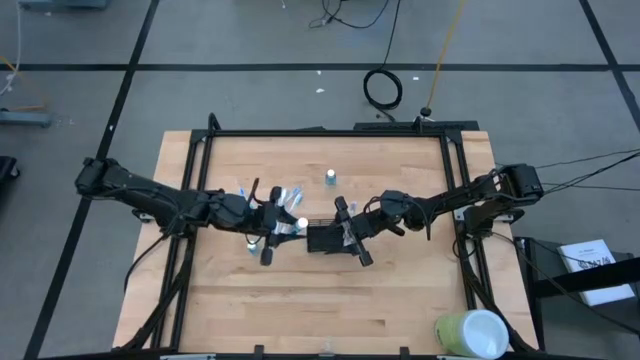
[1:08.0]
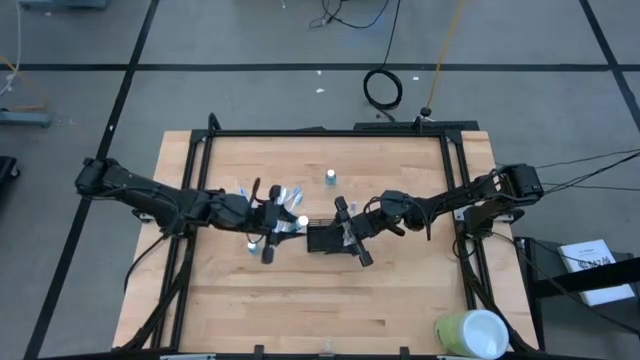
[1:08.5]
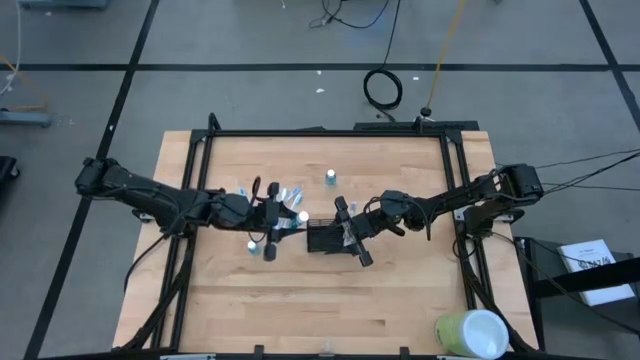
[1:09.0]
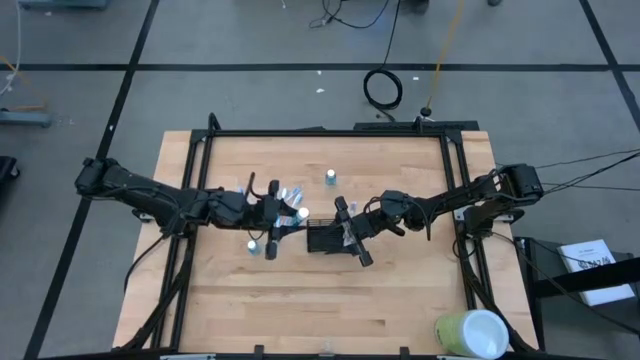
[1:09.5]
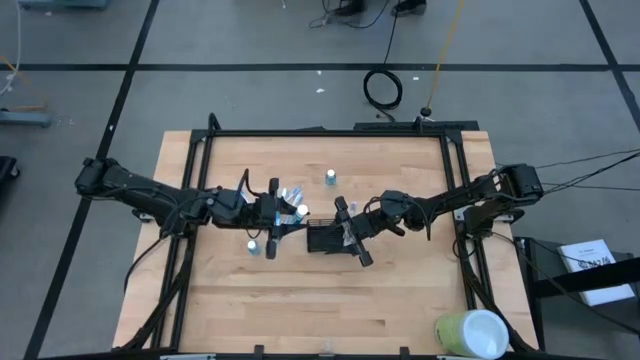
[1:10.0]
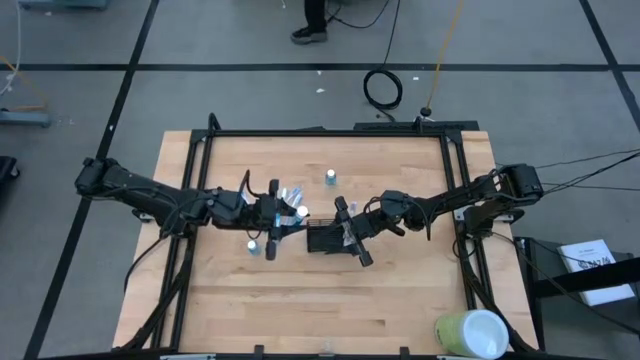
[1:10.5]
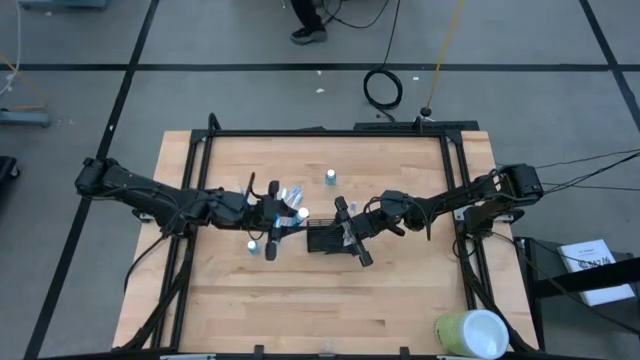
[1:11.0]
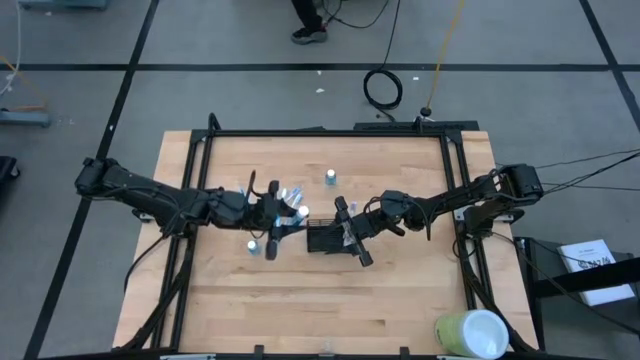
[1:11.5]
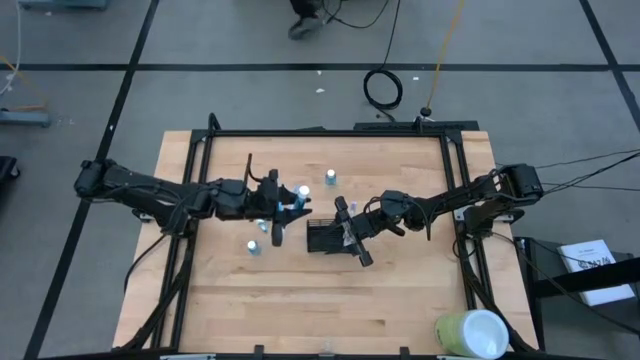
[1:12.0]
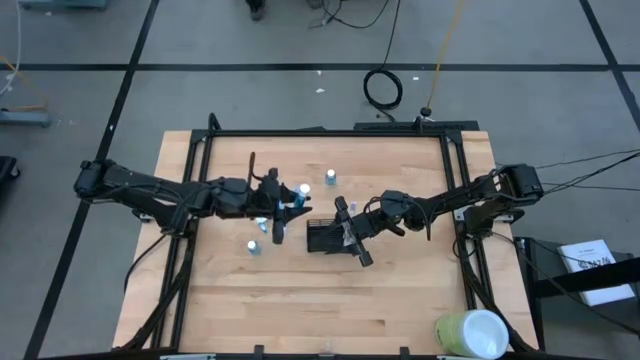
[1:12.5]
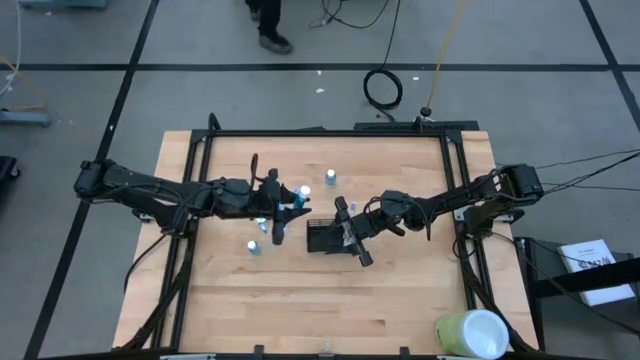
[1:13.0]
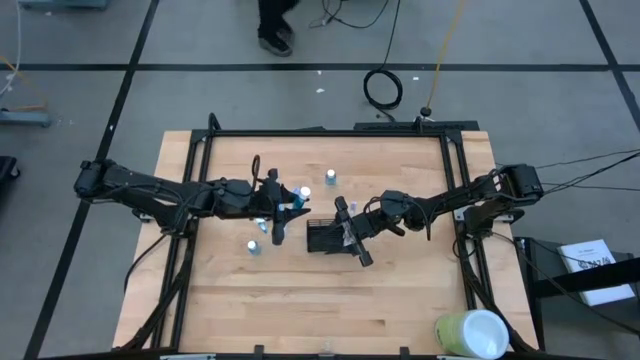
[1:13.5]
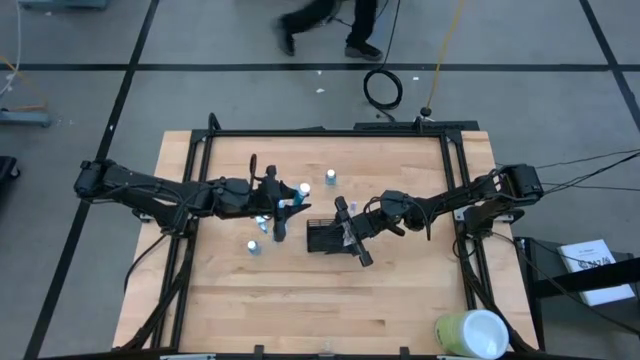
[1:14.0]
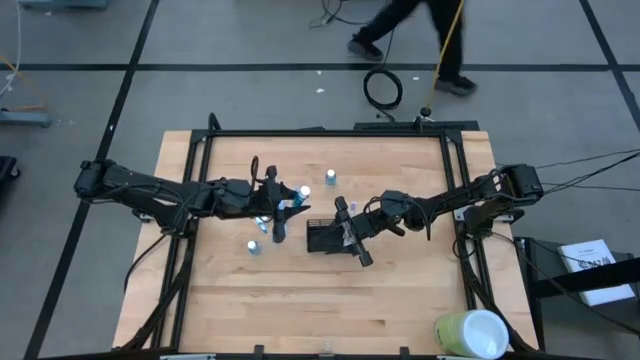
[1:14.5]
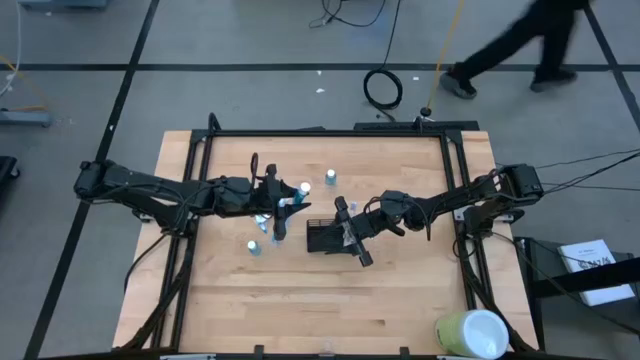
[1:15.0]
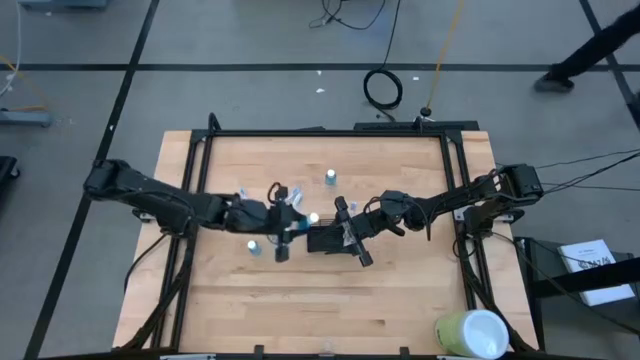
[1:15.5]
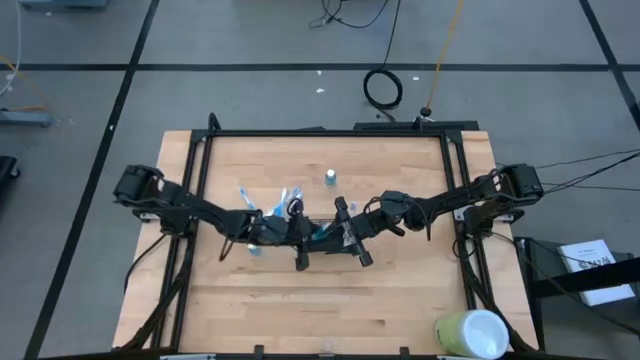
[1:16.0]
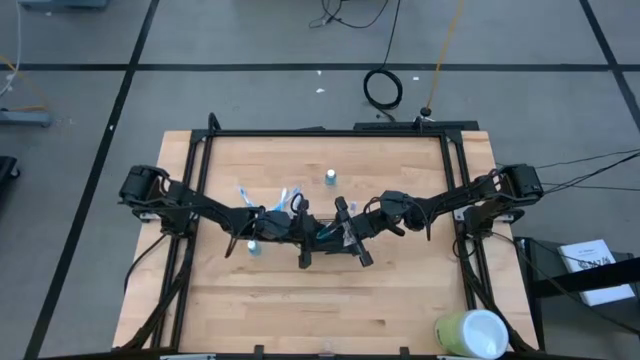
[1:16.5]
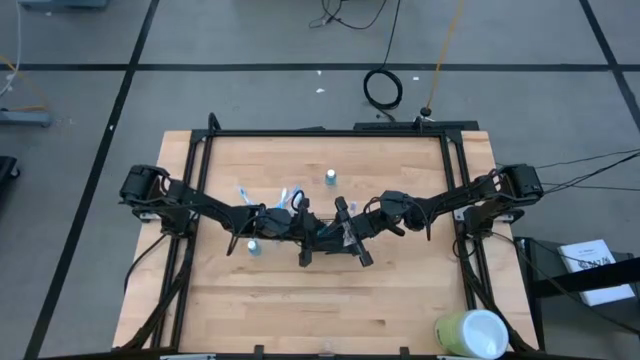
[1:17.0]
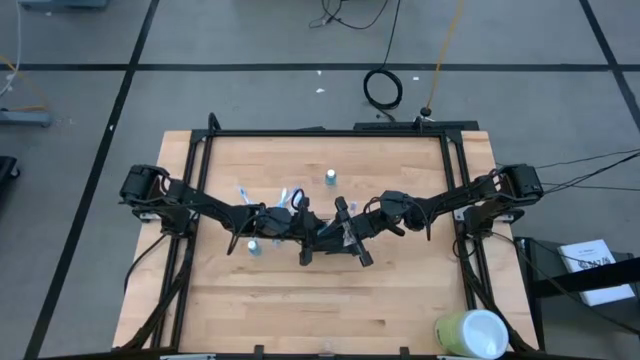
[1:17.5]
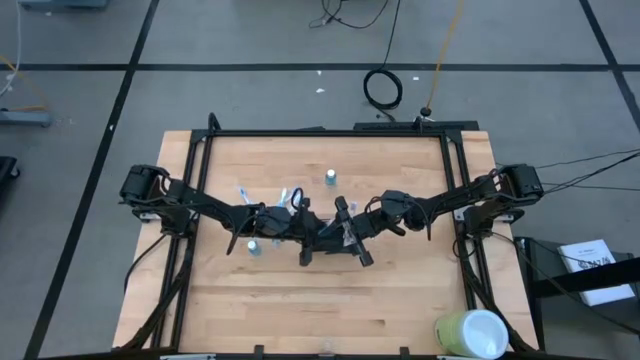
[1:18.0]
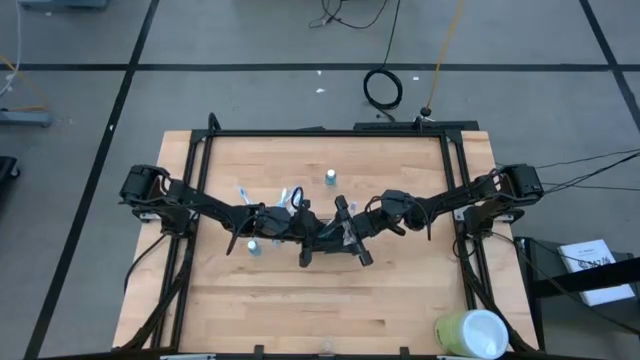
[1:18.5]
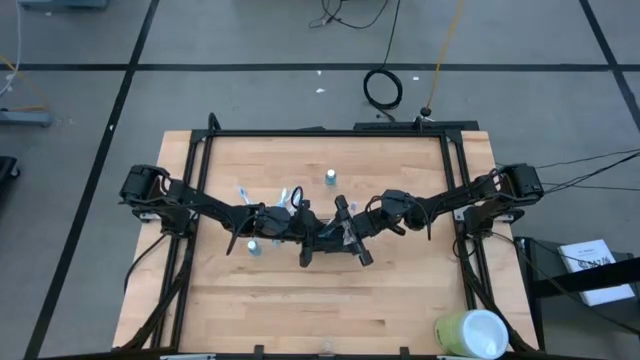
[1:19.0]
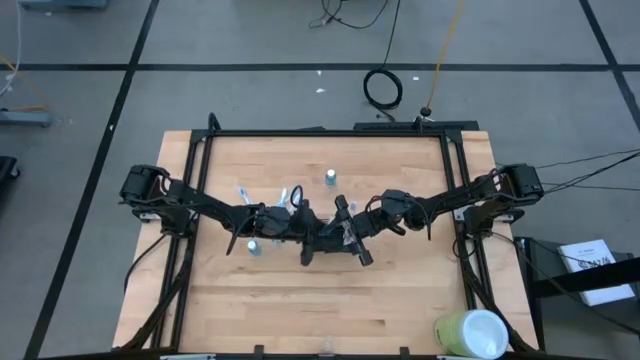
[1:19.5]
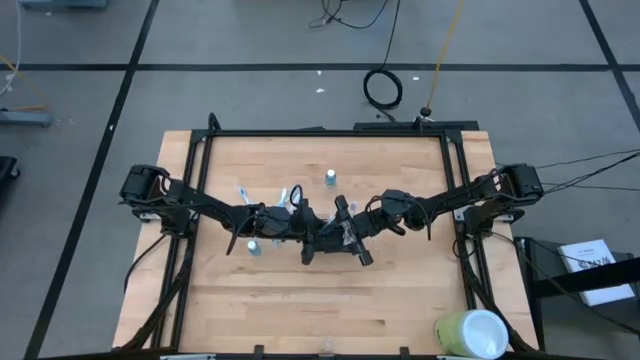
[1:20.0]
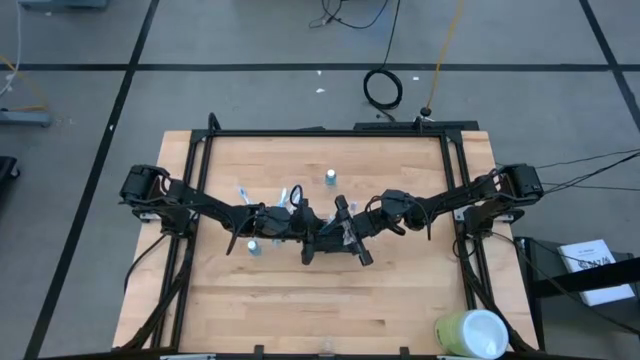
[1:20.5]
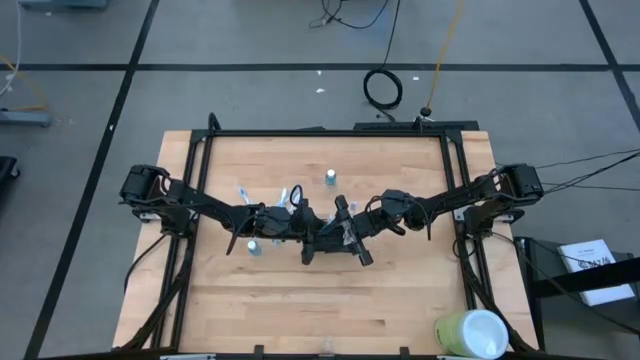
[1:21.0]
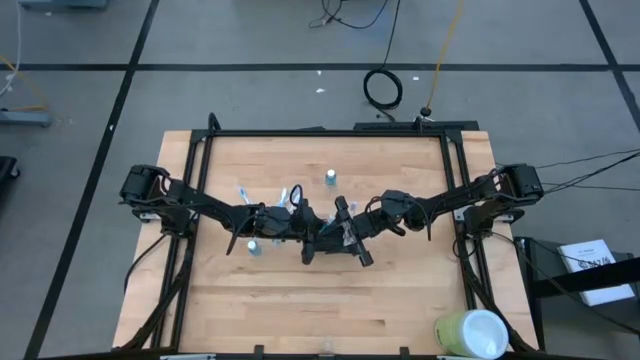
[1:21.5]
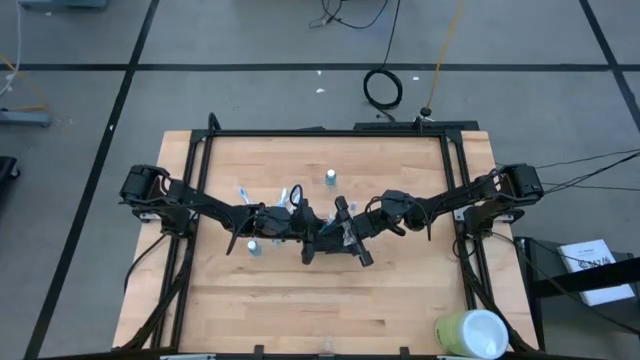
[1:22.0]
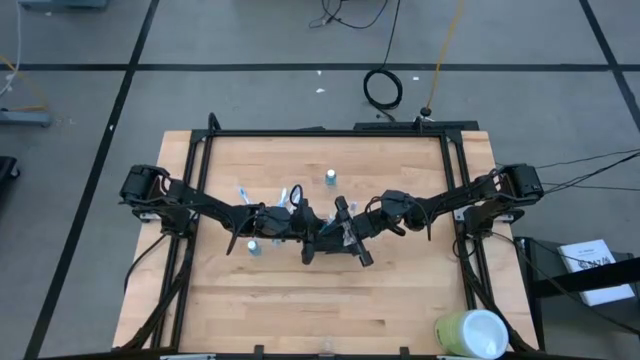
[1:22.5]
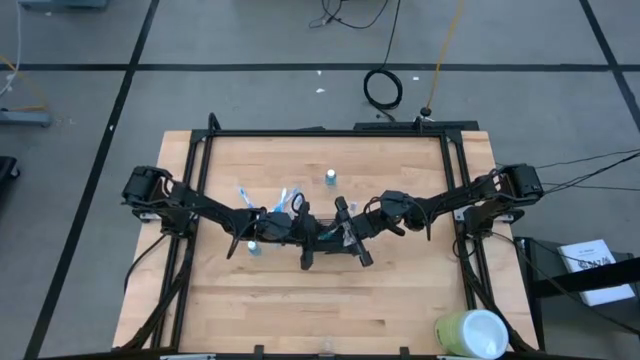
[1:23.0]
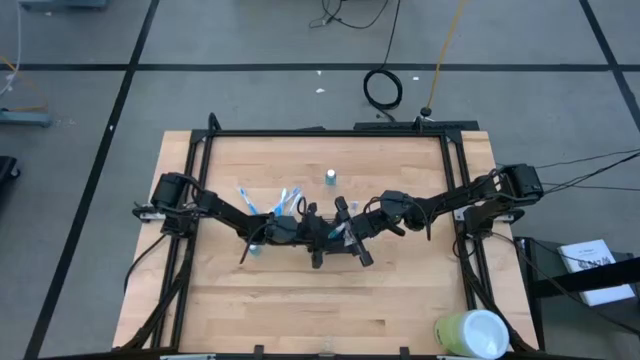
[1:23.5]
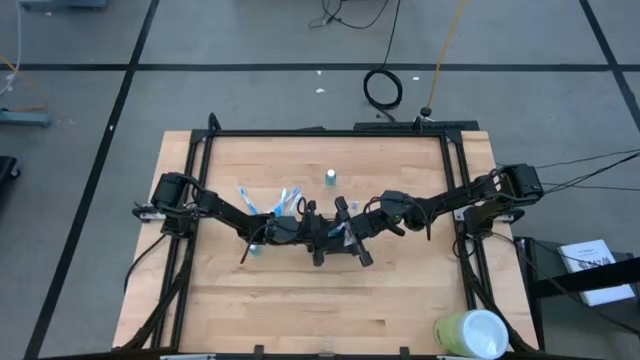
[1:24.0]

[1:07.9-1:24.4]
Task: Pick & Place toothbrushing station
Put the bottom right mouthwash into the middle section of the wire organizer

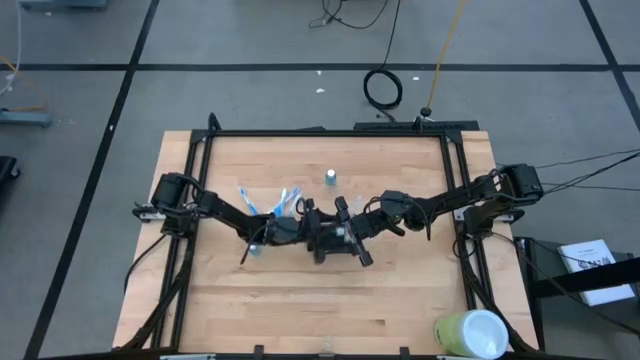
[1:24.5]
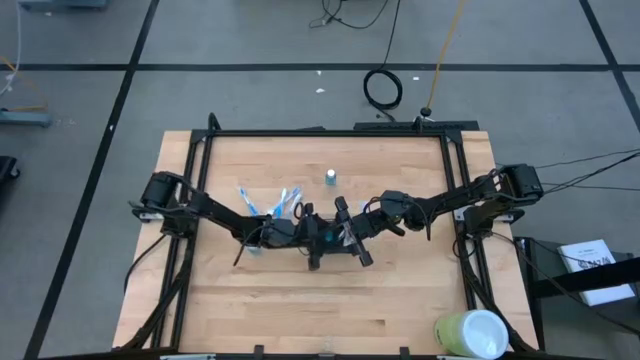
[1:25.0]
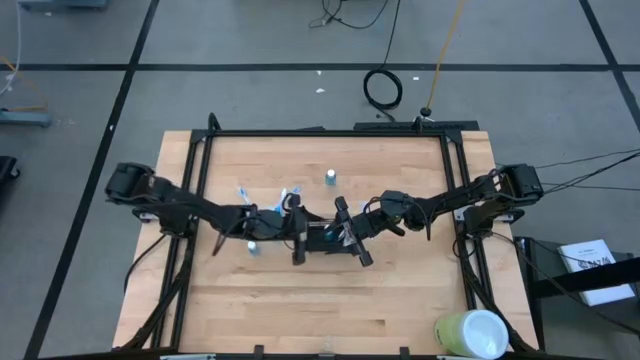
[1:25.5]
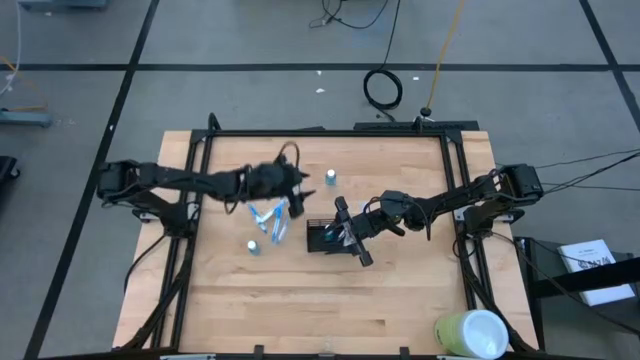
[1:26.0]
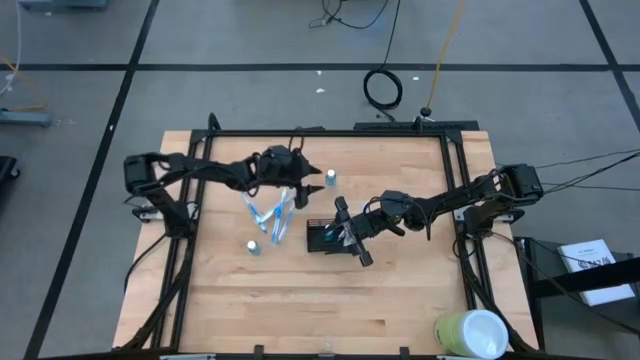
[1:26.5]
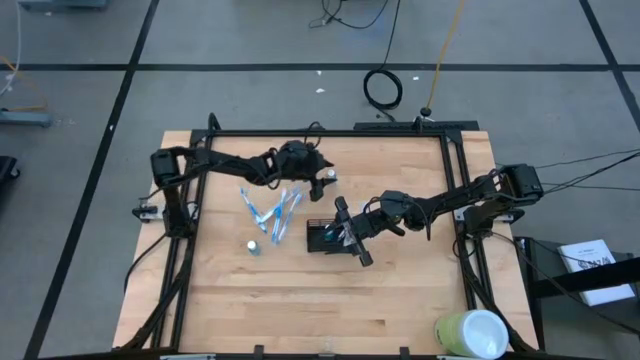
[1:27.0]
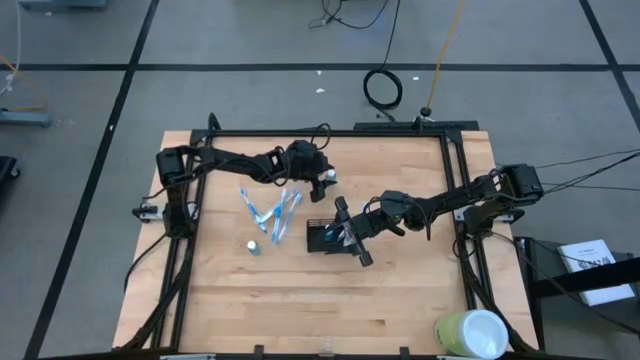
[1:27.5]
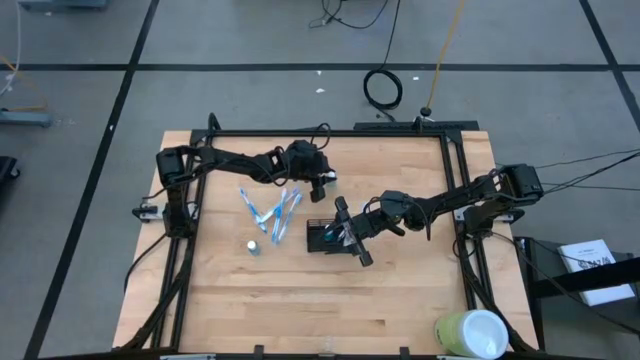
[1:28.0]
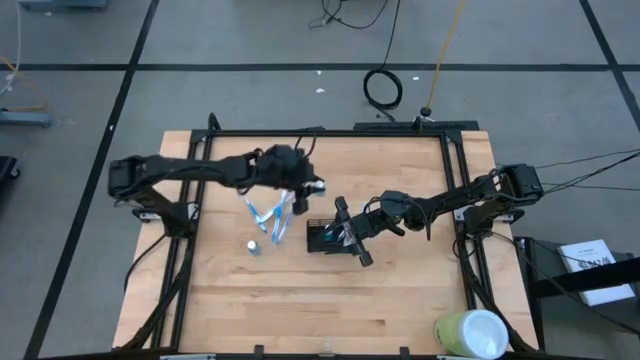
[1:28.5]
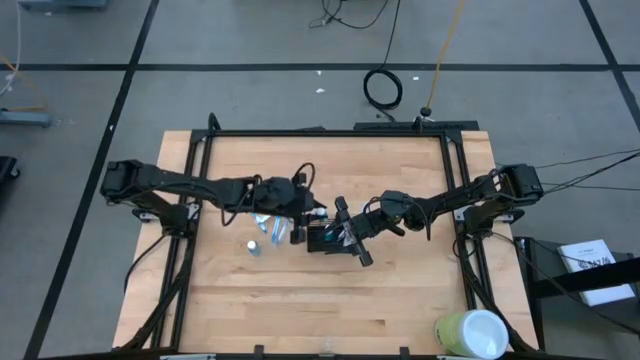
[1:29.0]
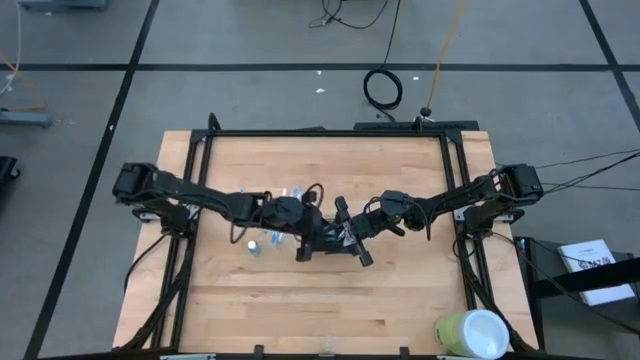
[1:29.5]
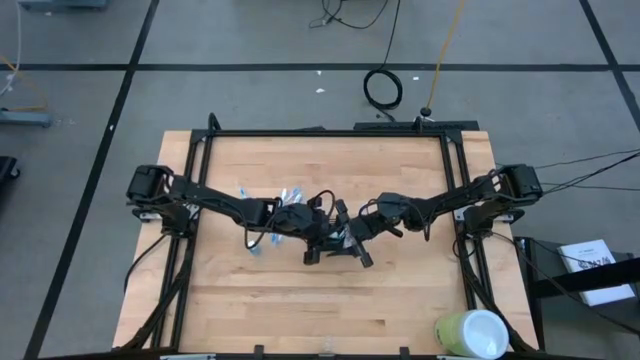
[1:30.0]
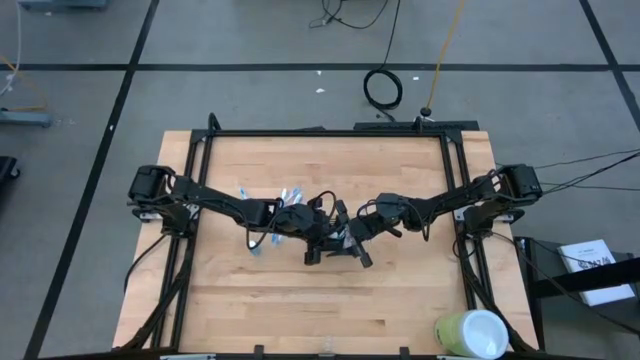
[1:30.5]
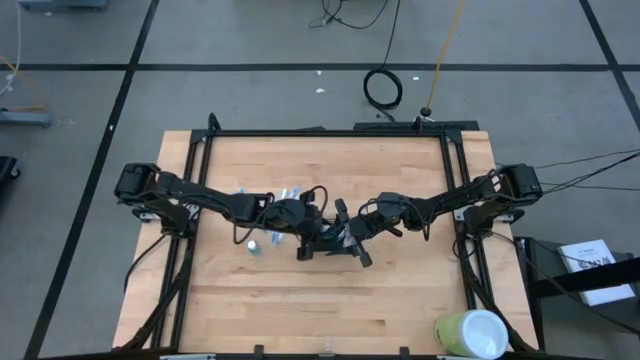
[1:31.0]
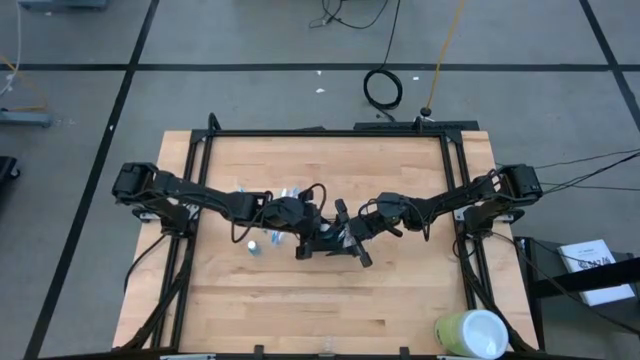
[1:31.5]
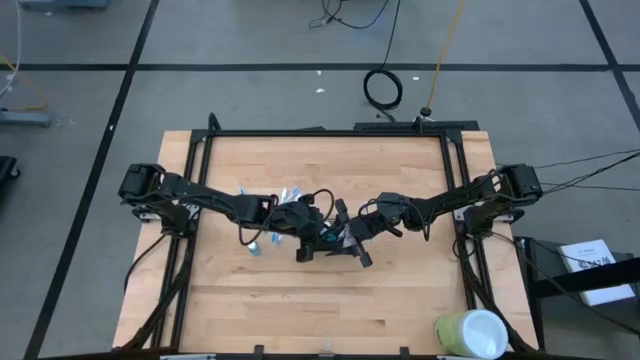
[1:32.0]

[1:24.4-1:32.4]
Put the top mouthwash into the middle section of the wire organizer
